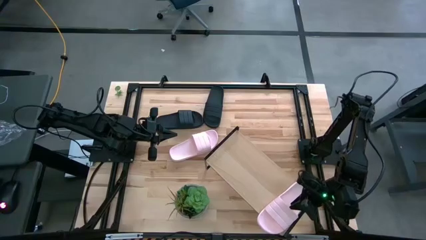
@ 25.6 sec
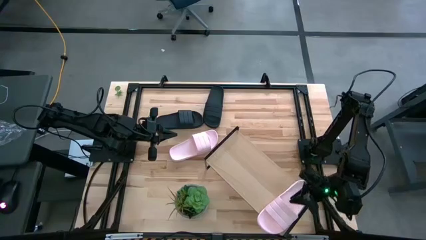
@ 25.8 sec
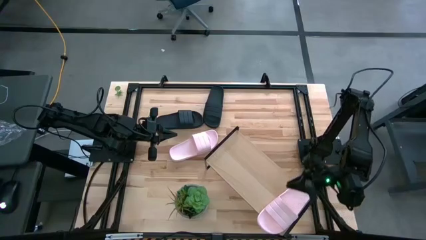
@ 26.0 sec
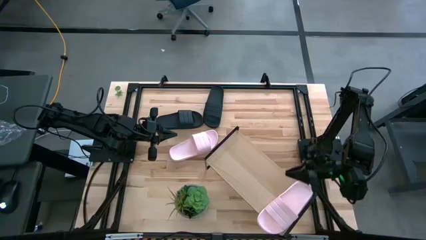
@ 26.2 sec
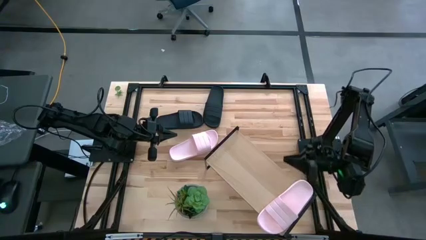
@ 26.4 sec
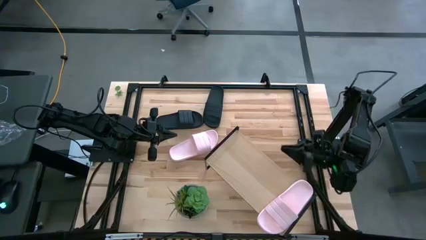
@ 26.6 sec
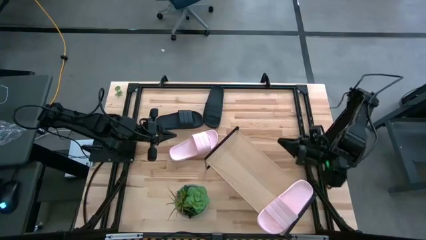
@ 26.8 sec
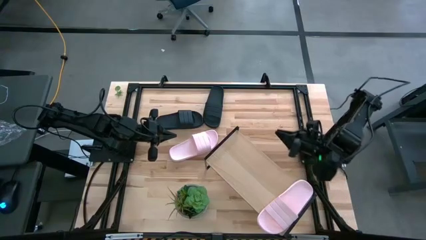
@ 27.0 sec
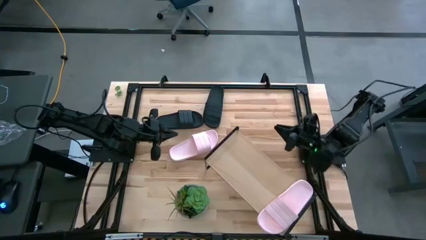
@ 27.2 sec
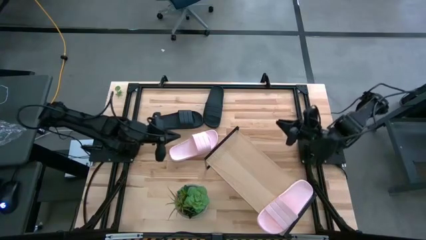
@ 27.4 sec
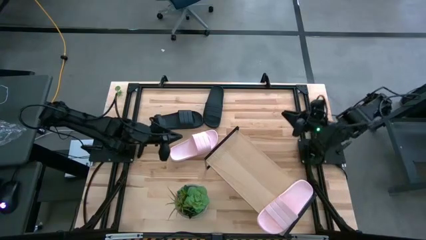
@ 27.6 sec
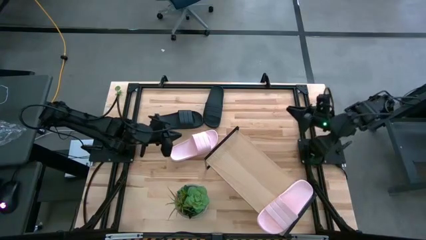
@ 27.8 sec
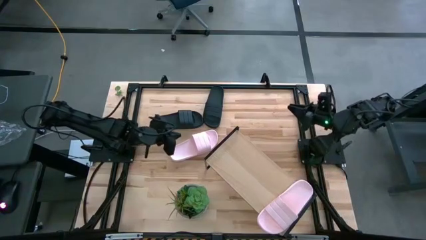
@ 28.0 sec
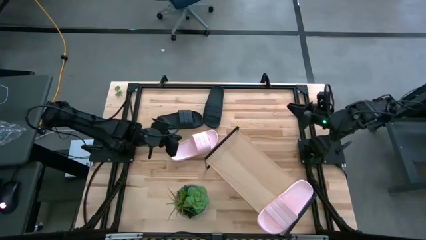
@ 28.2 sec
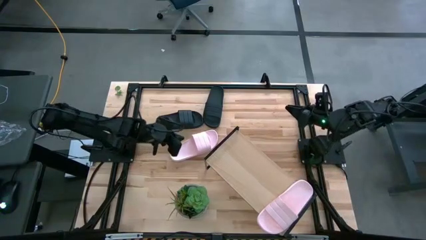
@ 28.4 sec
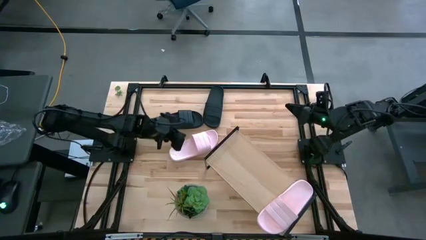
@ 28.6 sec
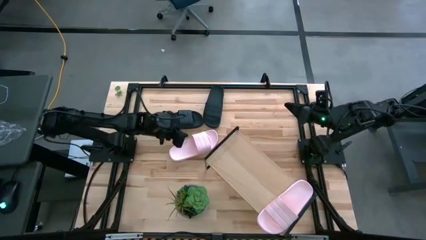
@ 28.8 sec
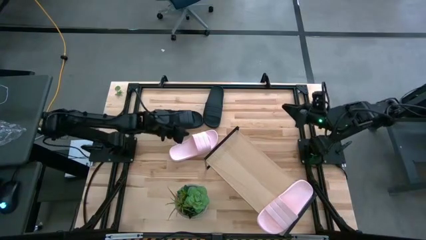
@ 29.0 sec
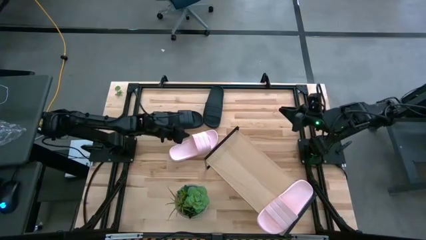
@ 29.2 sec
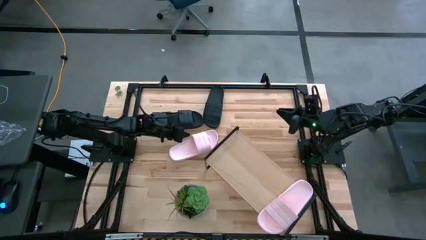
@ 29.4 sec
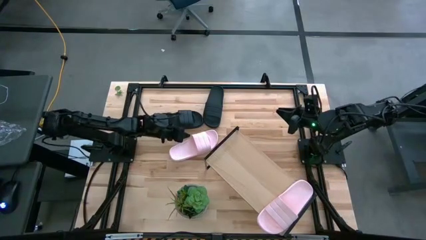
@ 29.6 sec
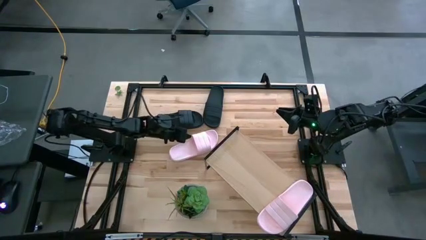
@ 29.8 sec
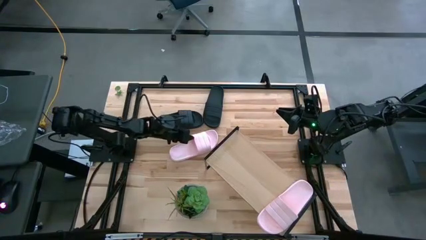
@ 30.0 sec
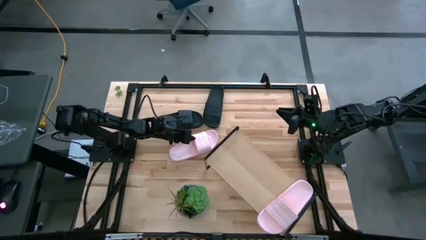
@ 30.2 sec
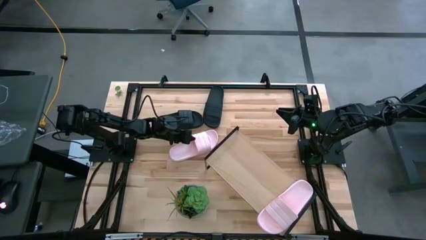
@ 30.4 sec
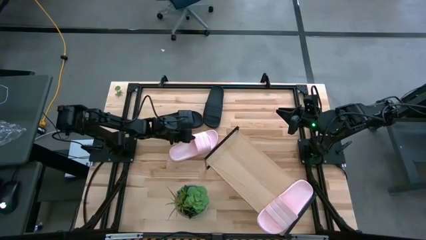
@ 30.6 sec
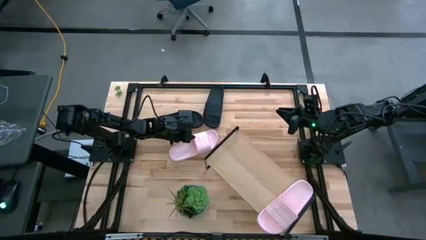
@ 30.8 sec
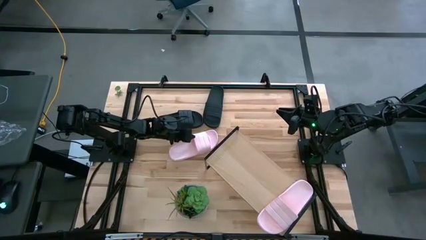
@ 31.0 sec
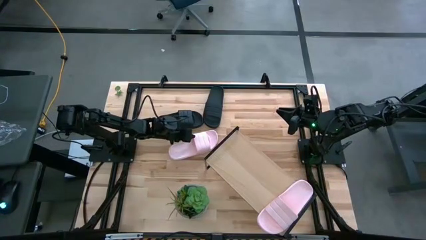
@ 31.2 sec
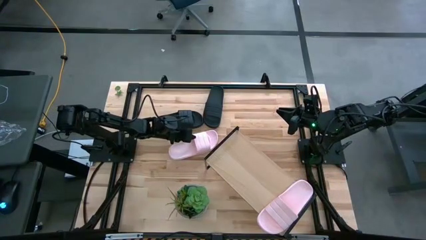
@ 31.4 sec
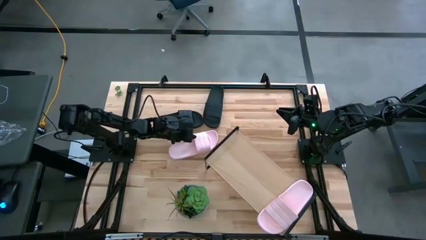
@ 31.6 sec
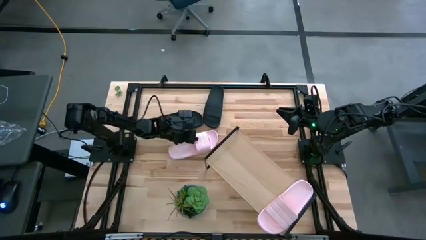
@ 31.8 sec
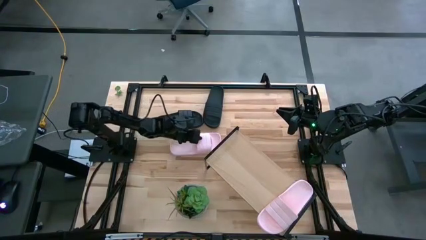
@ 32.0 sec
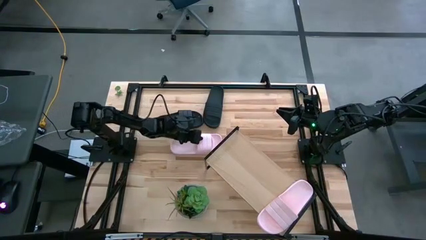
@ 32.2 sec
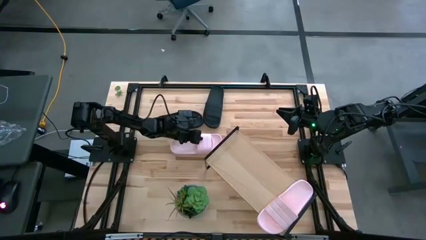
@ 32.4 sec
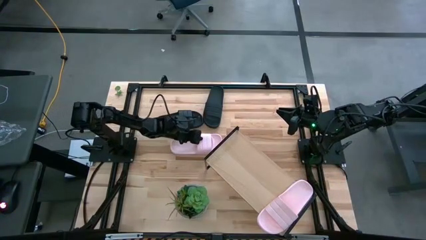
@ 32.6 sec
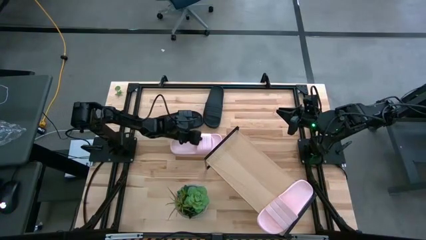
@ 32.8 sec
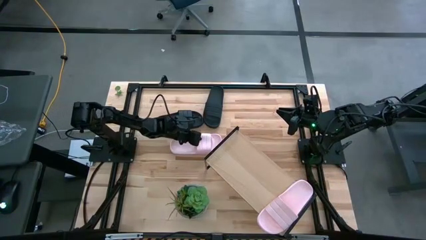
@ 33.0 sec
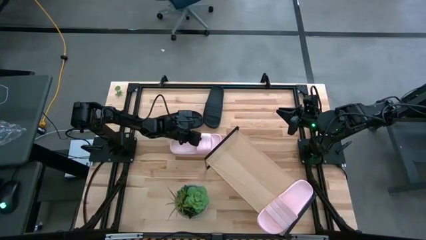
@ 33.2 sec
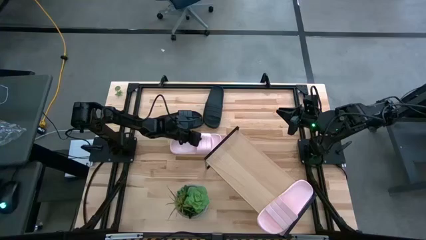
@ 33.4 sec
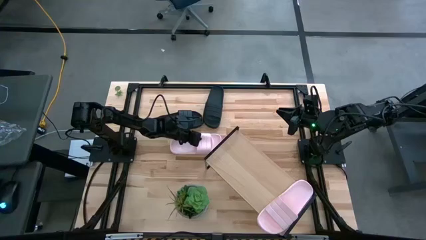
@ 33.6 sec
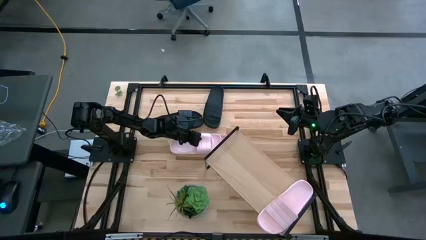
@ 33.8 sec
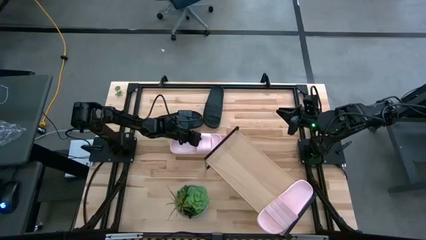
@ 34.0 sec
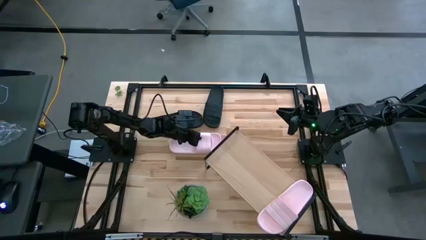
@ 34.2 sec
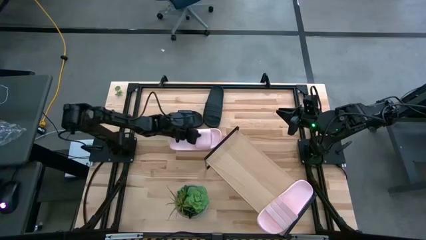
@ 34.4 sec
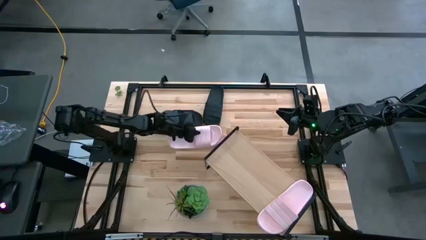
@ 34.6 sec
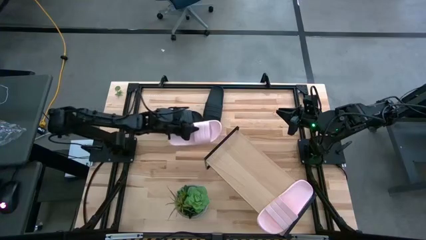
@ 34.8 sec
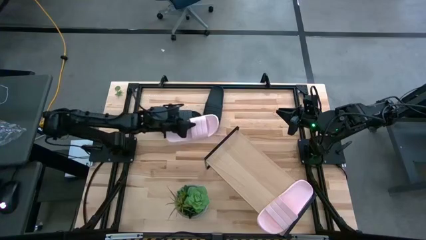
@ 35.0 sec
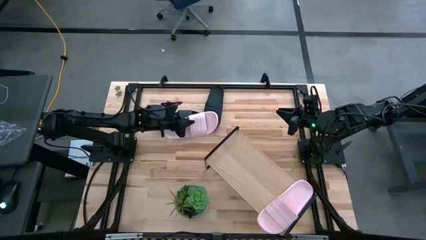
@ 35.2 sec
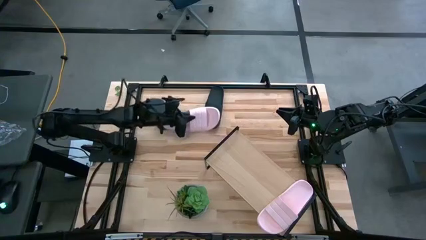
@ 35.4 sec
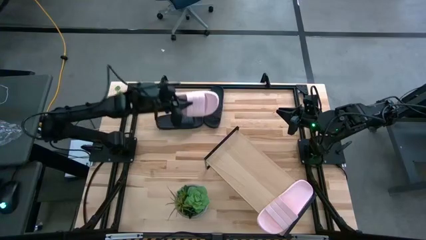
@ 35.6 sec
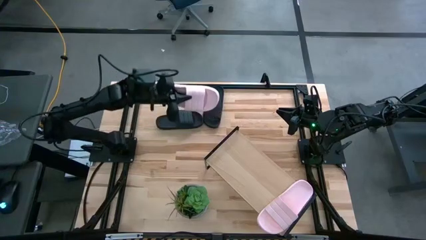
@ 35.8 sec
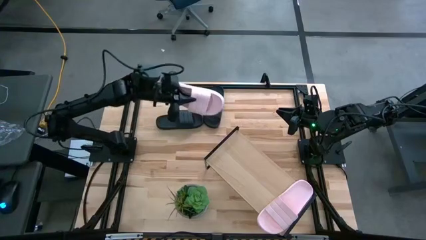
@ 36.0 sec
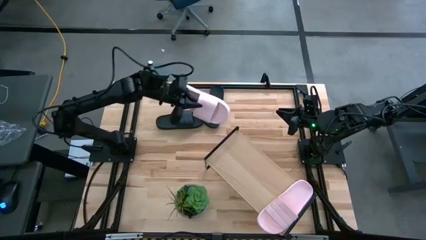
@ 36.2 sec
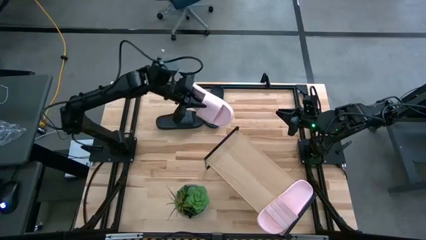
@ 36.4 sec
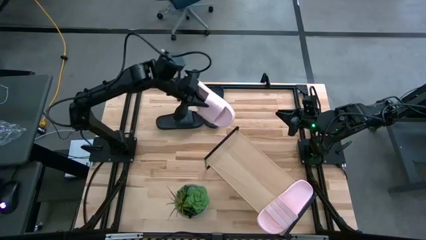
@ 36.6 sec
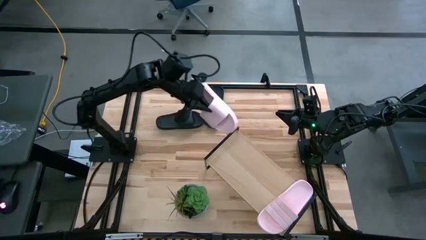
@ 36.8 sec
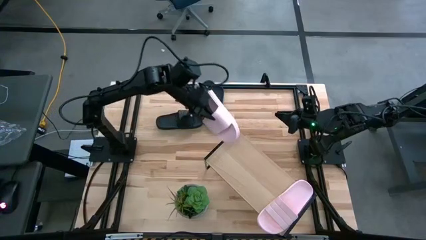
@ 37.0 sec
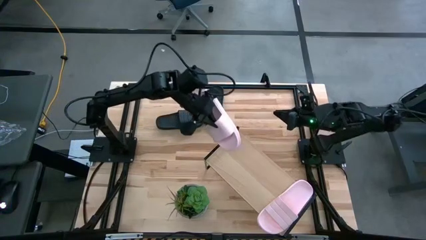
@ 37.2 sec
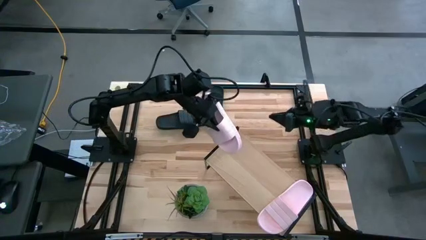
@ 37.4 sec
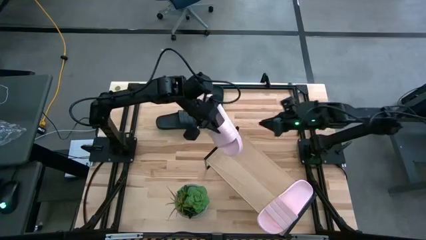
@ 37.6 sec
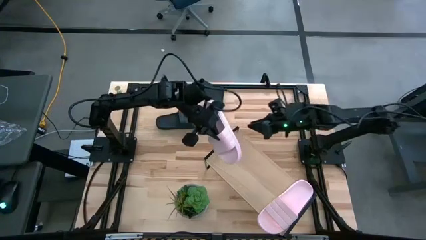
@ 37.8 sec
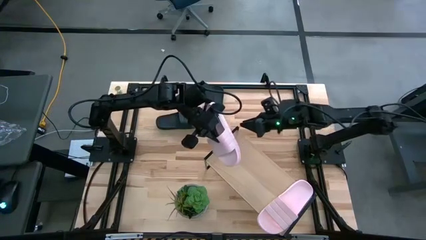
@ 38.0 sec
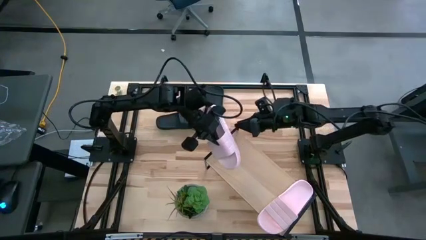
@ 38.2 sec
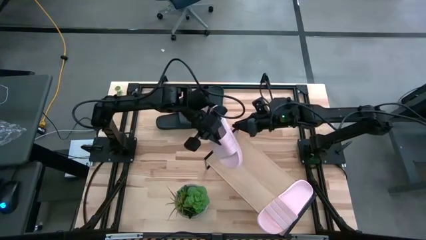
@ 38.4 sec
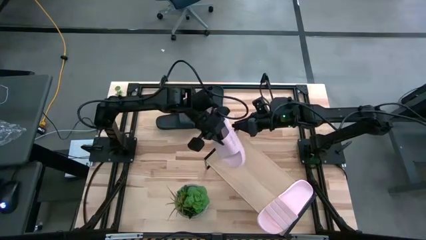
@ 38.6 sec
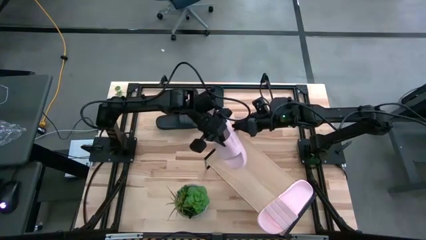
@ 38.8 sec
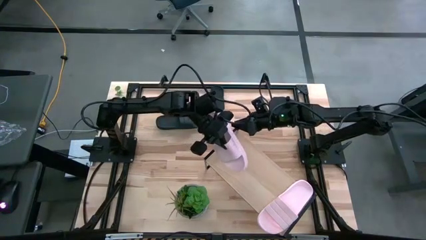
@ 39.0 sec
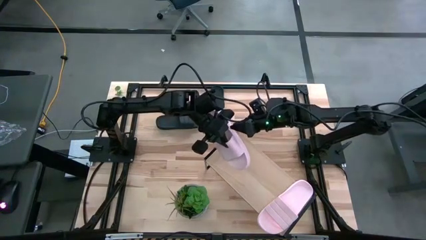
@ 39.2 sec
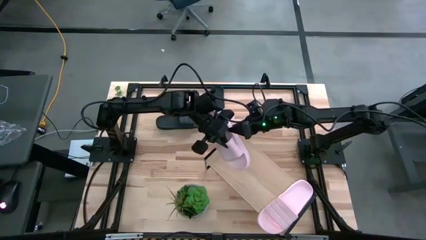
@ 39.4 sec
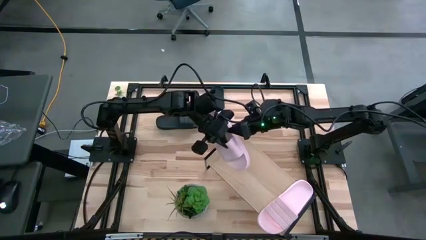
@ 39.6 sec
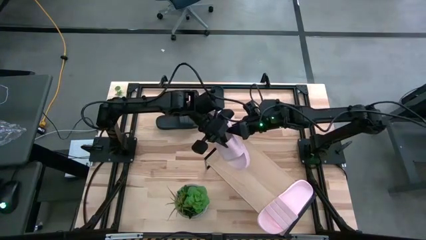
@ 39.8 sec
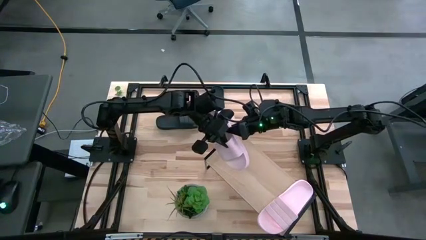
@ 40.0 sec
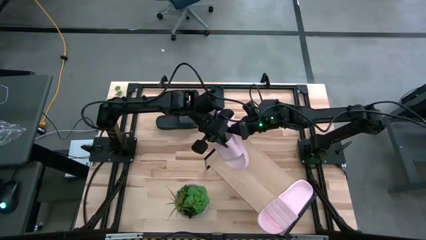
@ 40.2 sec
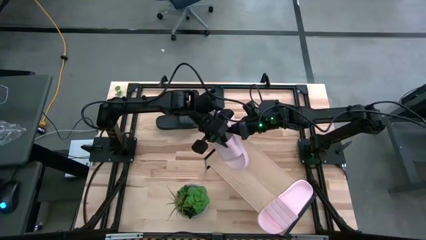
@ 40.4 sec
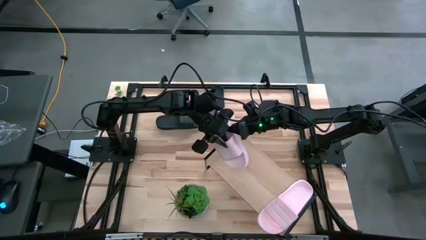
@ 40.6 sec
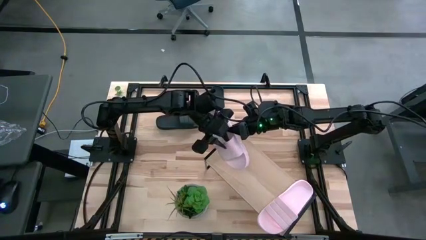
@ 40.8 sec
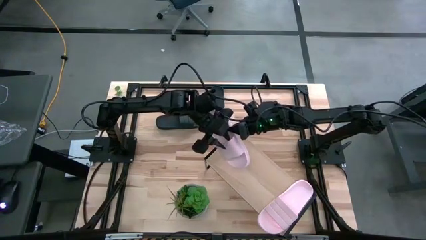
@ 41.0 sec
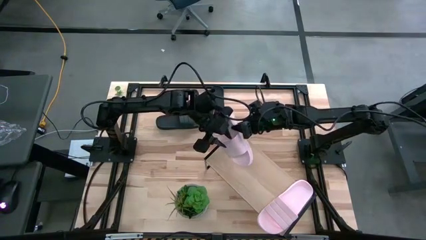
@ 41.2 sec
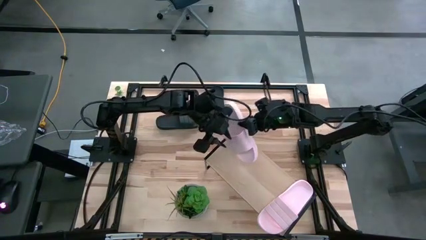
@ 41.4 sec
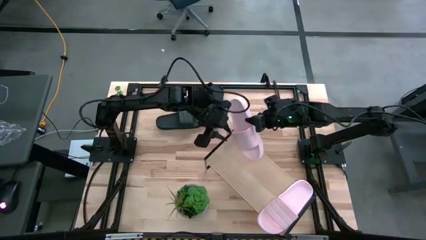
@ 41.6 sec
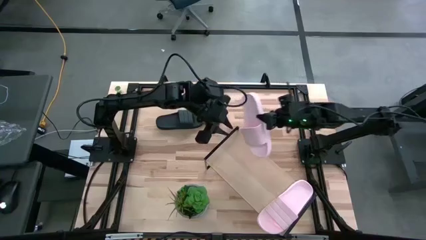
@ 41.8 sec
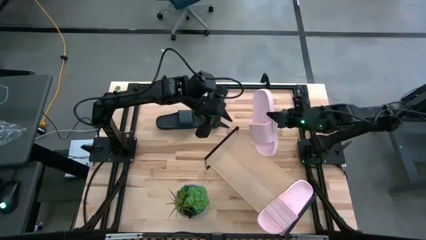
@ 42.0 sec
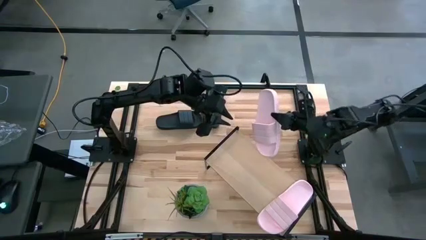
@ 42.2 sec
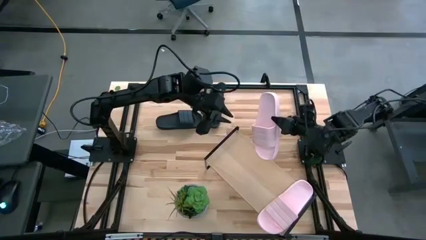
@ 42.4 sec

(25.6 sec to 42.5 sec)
Task: Pick and place slides into the shelf
Put the pink slides on the shelf
